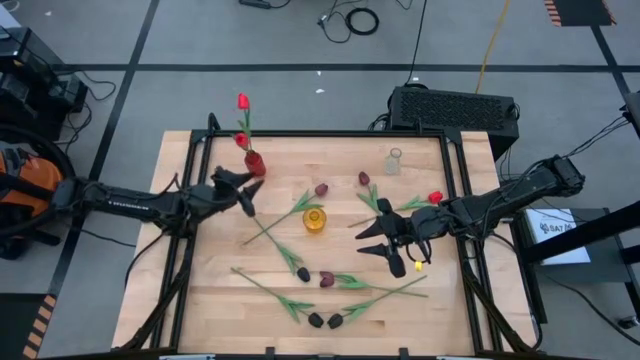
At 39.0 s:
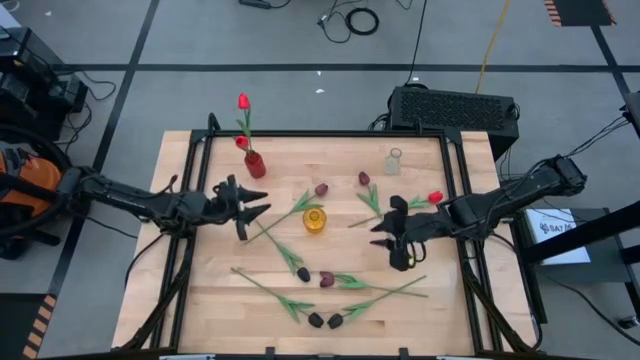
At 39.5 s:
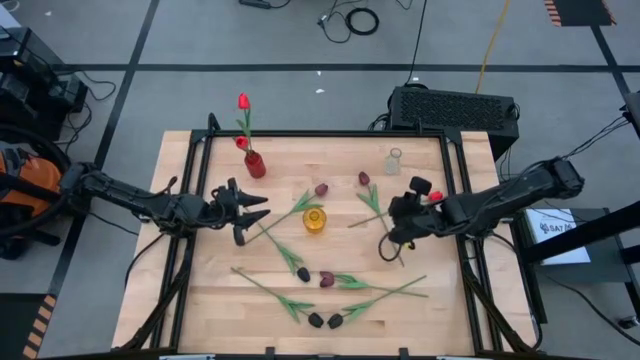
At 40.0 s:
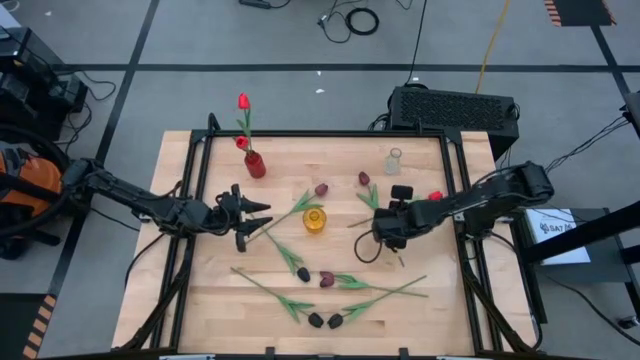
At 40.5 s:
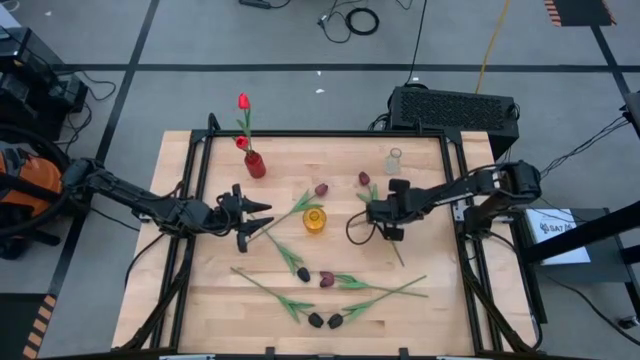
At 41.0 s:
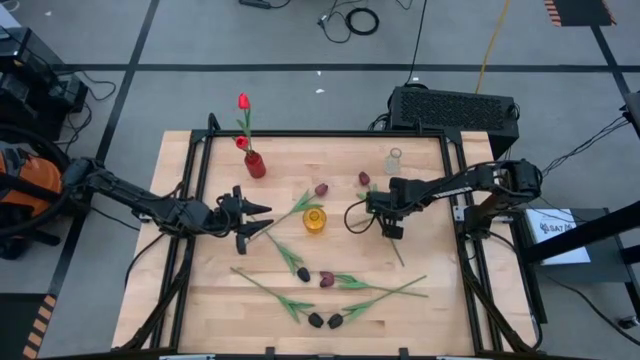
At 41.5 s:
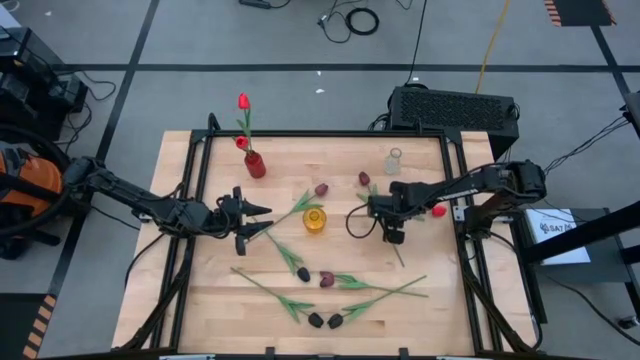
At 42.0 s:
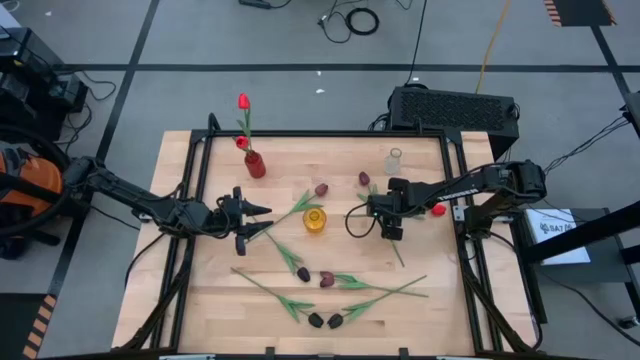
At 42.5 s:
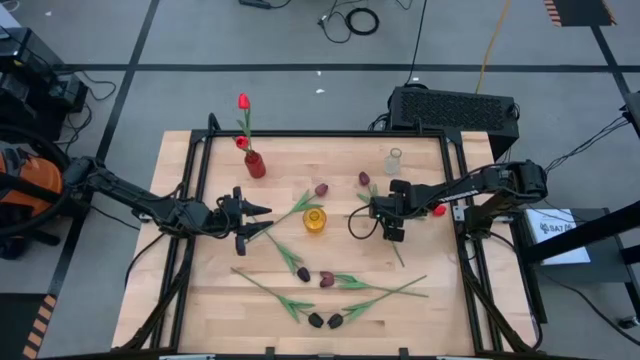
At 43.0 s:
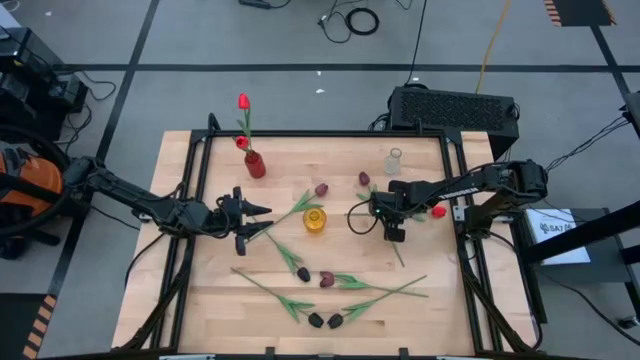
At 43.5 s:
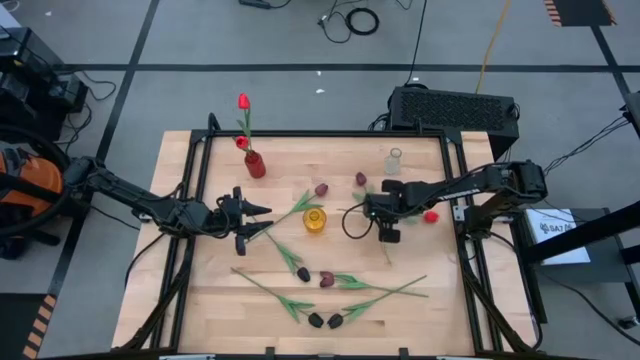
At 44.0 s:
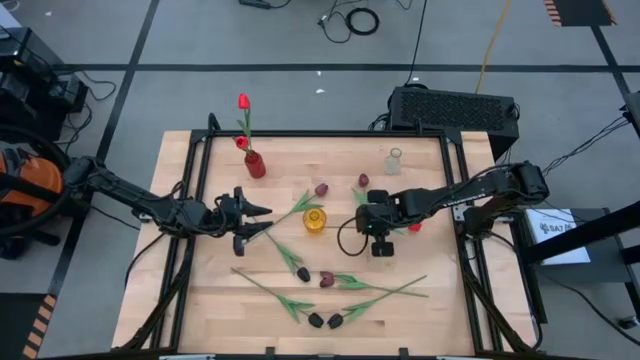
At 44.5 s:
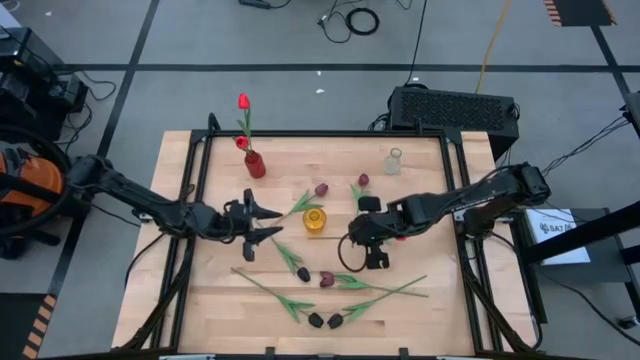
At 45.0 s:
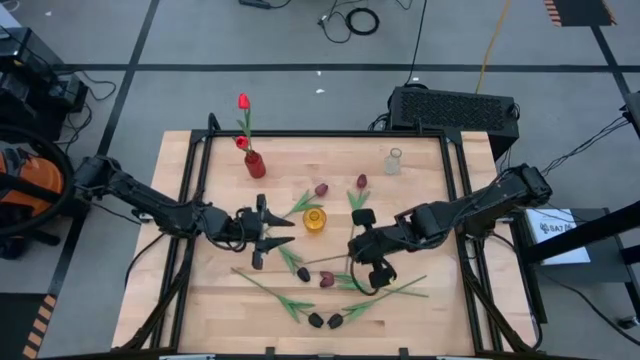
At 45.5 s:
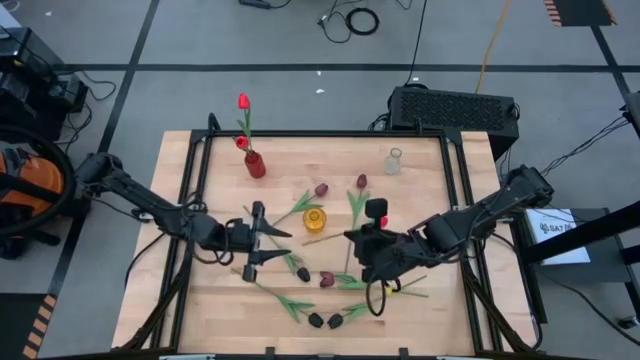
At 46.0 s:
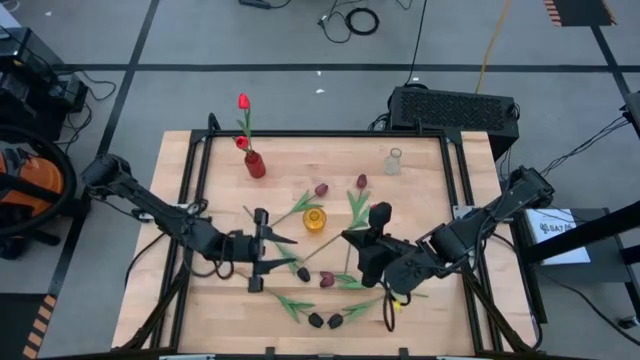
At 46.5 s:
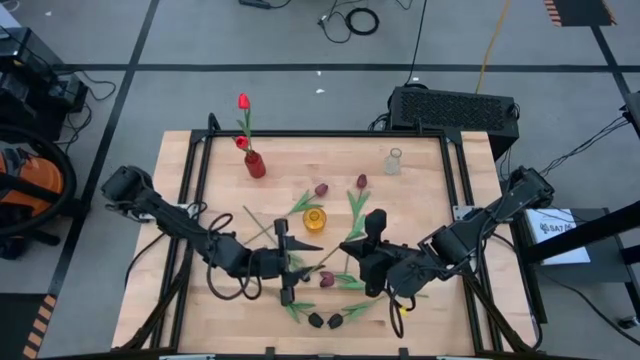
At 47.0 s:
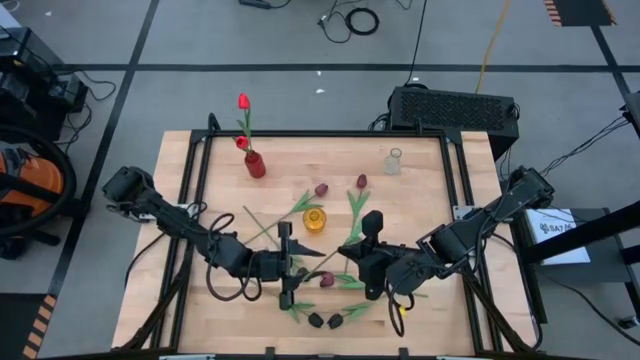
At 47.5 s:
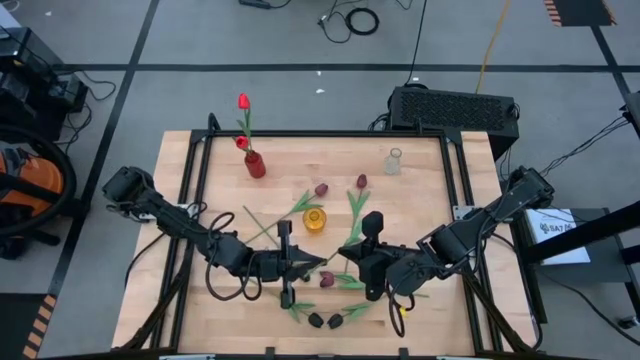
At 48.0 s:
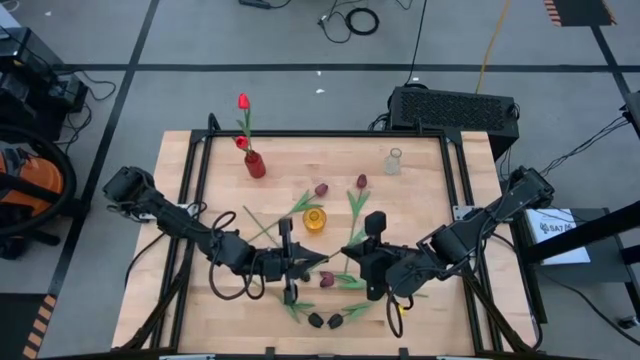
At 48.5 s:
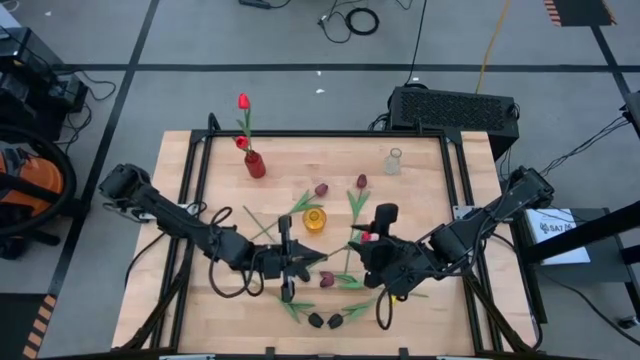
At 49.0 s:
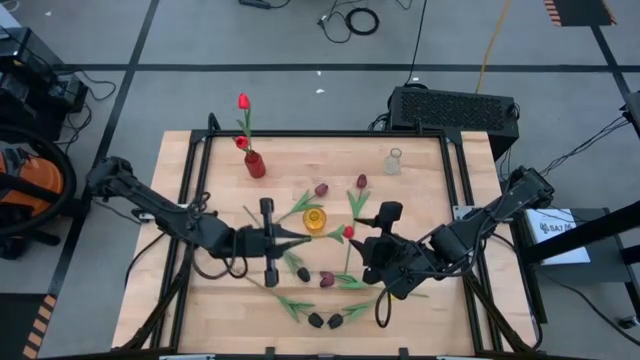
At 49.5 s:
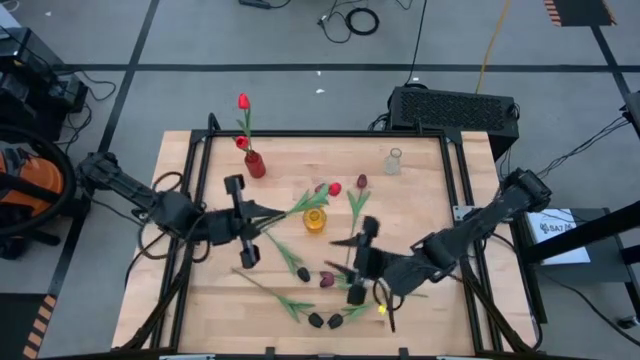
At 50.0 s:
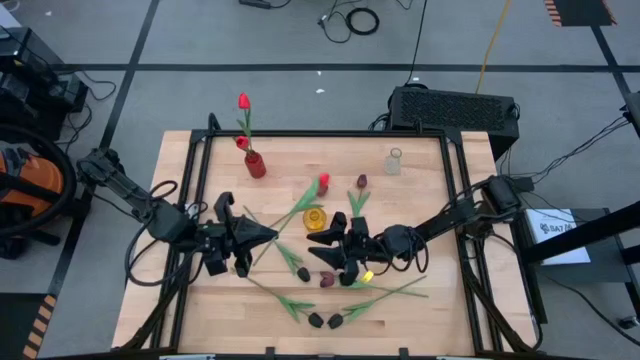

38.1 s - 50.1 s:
Task: Sort flowers into vase by color
Put the red flower into the red vase

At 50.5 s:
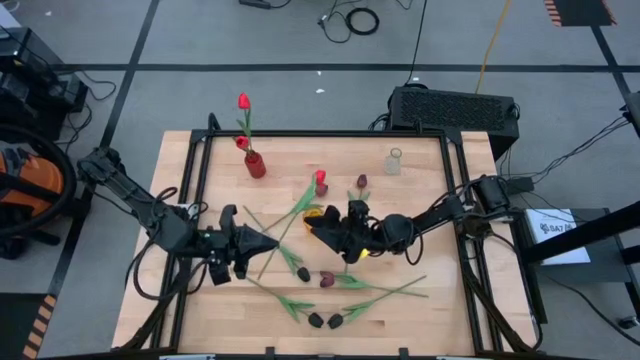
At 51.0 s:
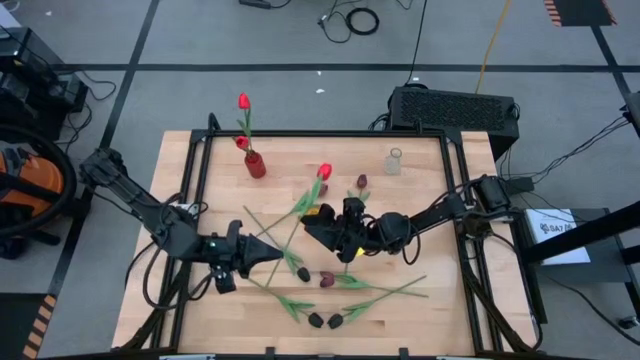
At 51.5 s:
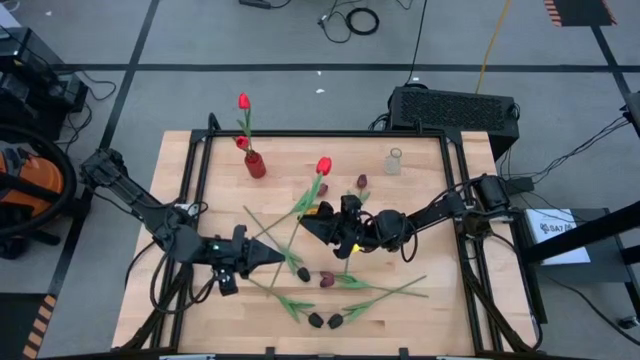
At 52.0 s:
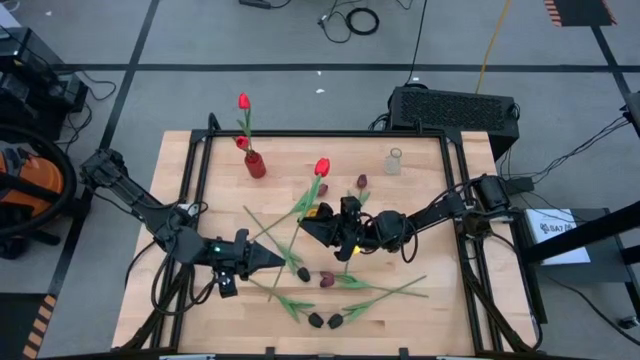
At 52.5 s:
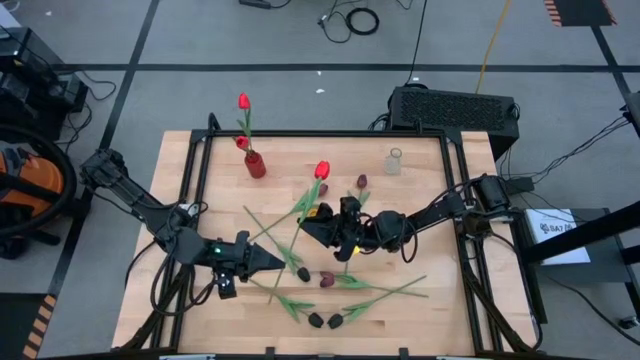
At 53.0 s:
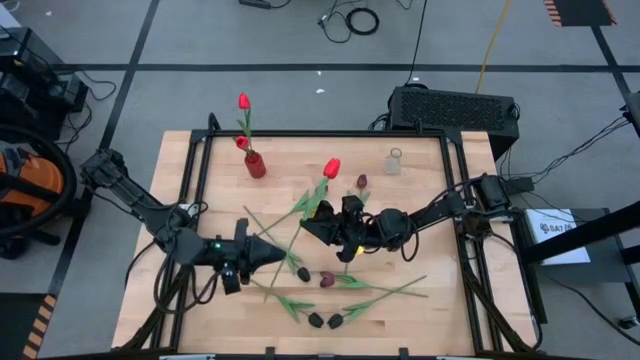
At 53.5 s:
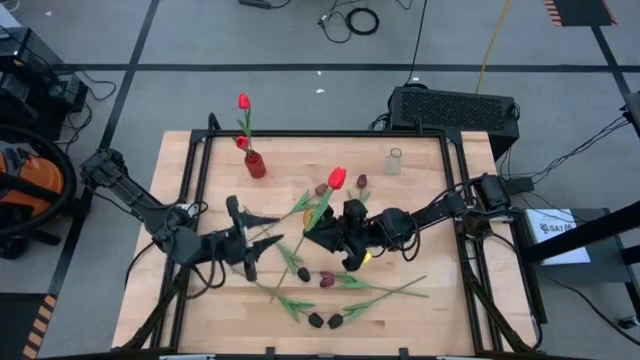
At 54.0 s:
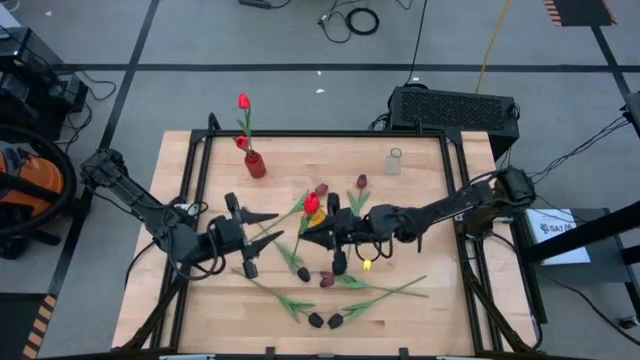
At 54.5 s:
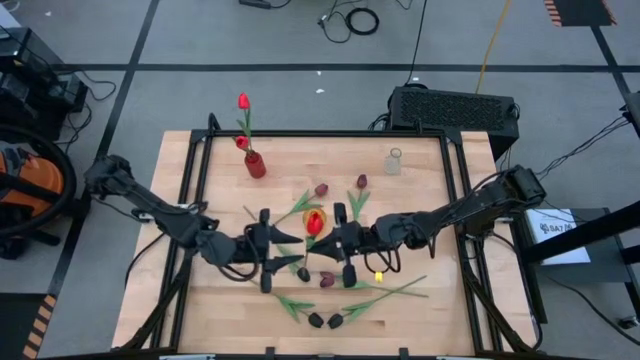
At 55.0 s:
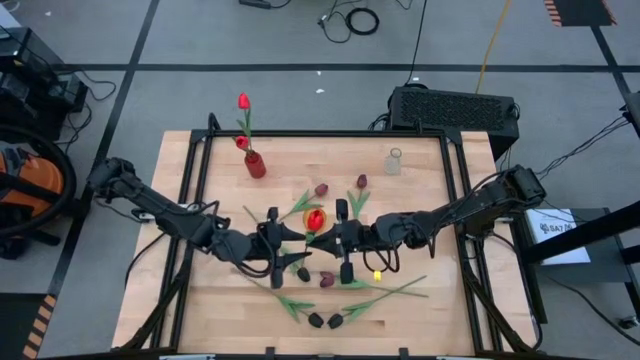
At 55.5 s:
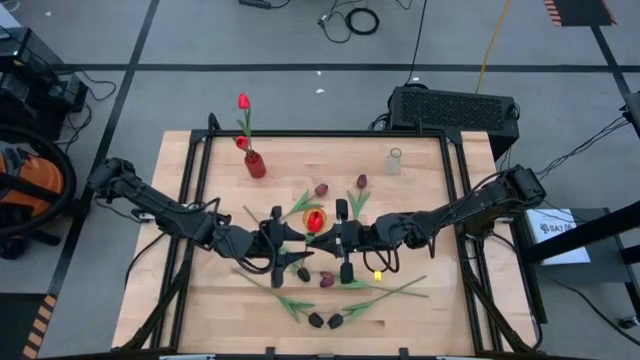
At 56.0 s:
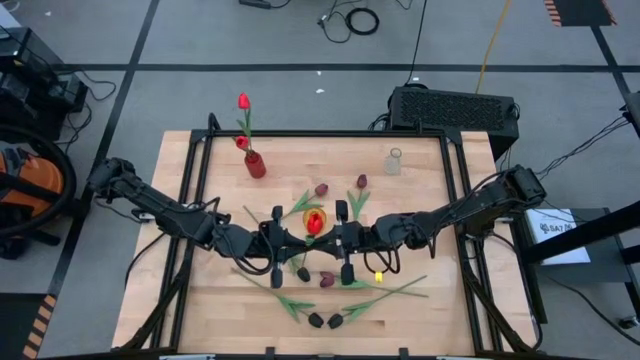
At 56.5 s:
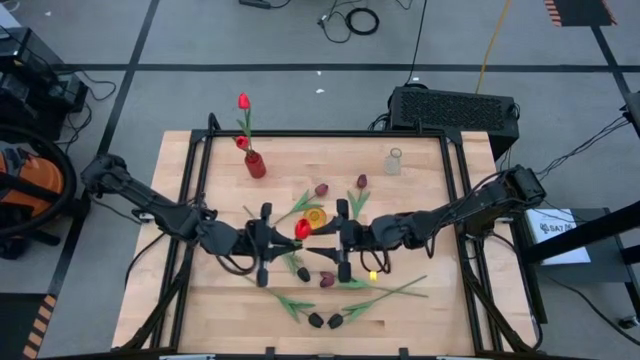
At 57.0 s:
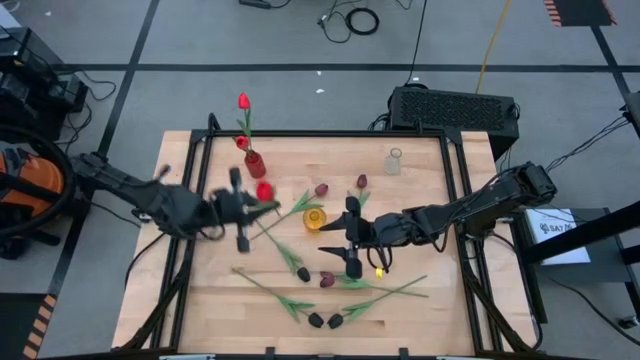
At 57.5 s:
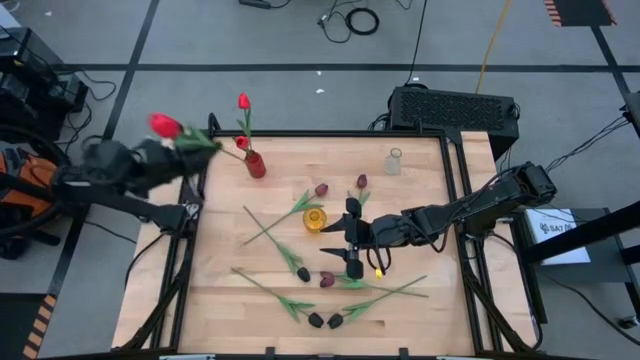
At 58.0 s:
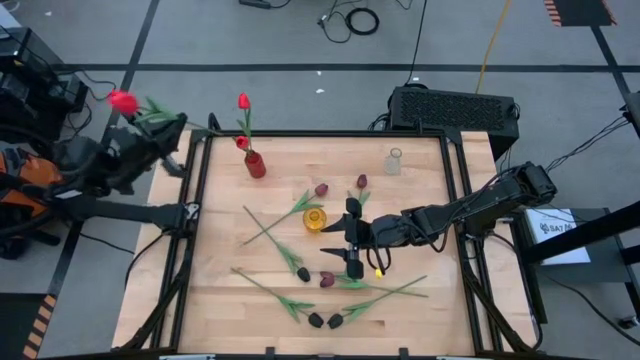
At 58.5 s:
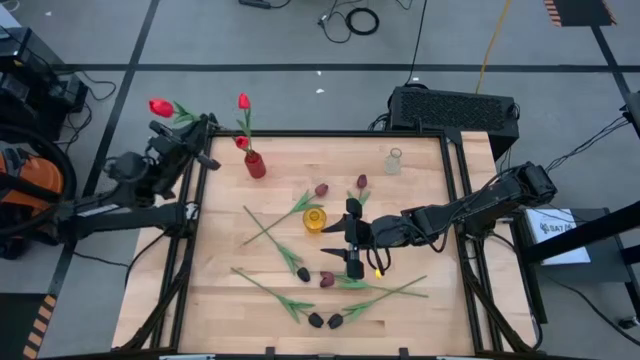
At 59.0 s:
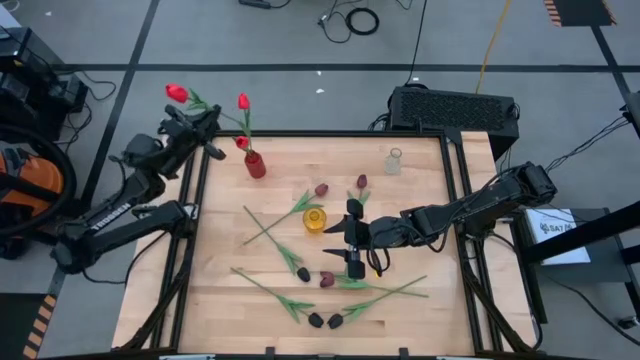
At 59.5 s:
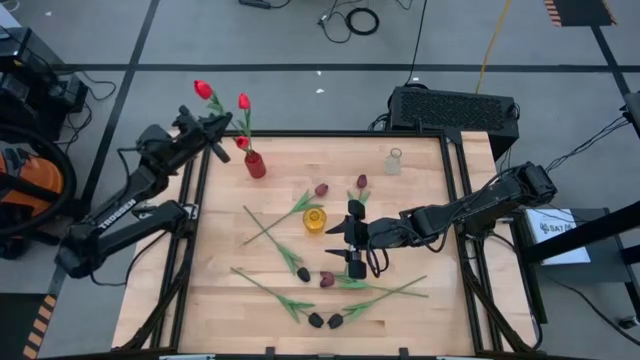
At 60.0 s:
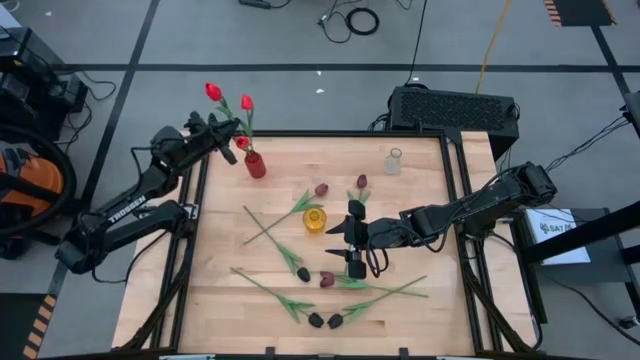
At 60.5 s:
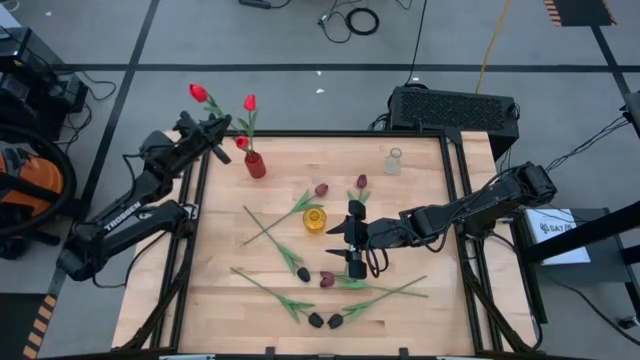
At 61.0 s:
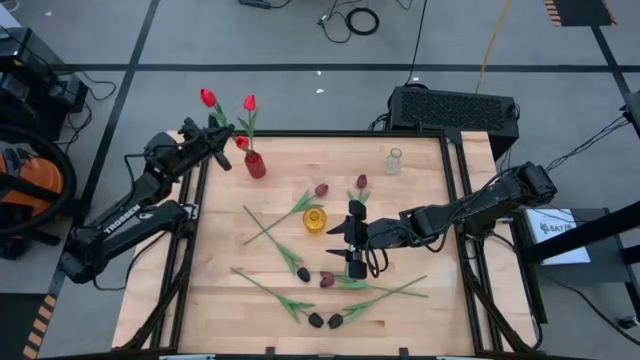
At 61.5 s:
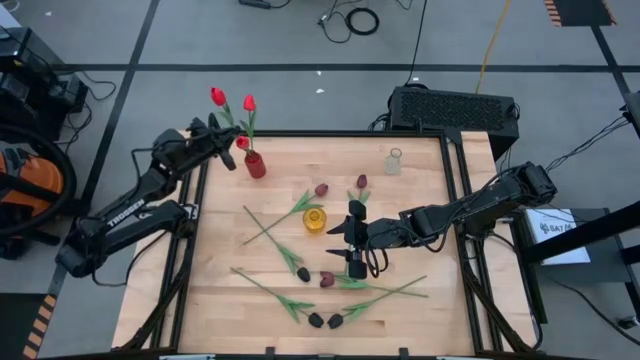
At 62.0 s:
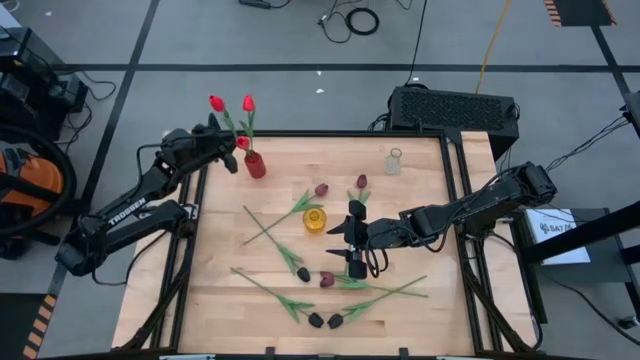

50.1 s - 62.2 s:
Put the red flower into the red vase
